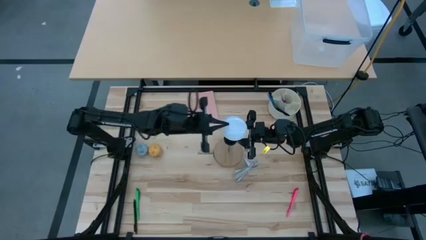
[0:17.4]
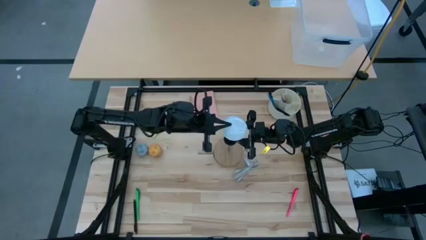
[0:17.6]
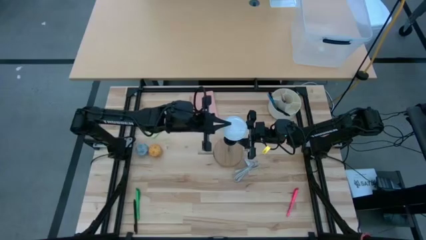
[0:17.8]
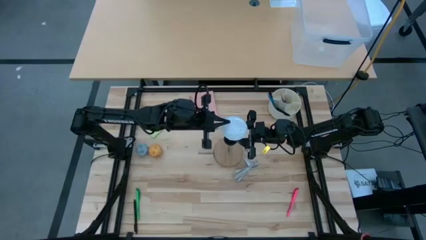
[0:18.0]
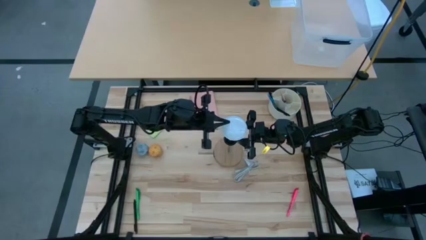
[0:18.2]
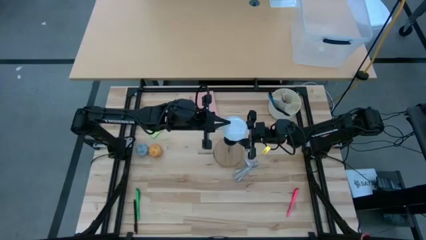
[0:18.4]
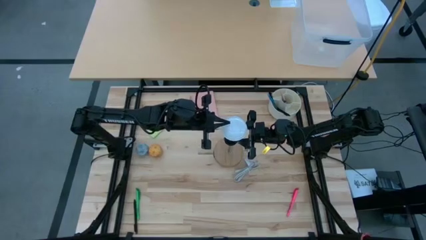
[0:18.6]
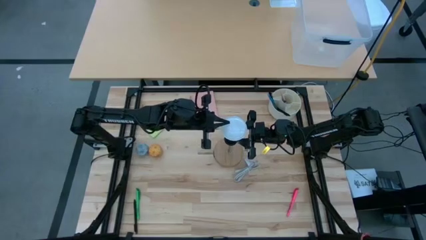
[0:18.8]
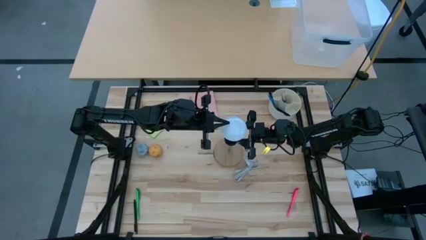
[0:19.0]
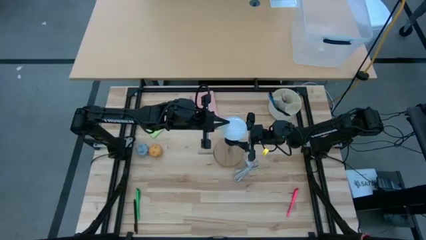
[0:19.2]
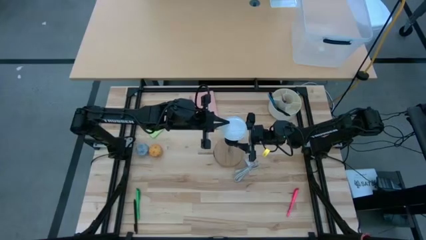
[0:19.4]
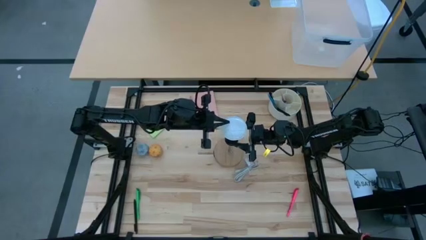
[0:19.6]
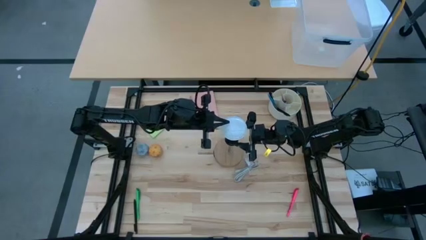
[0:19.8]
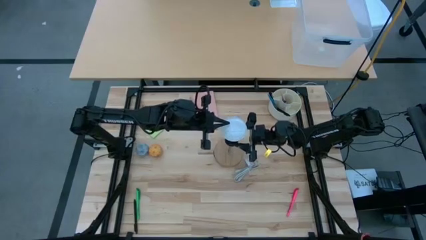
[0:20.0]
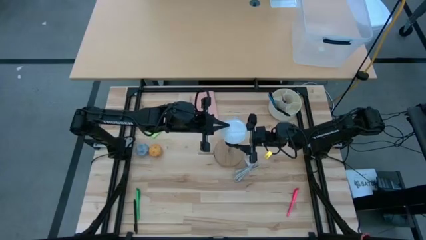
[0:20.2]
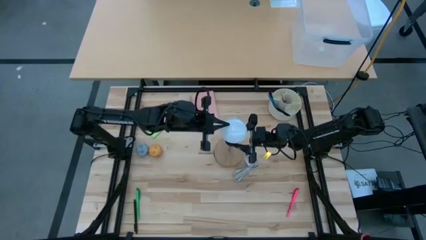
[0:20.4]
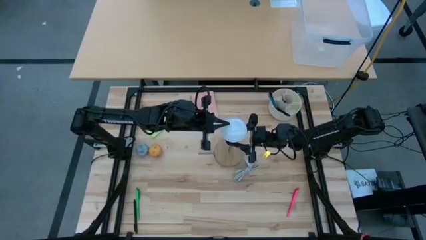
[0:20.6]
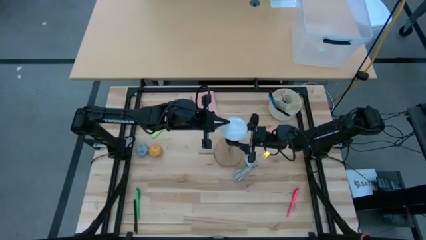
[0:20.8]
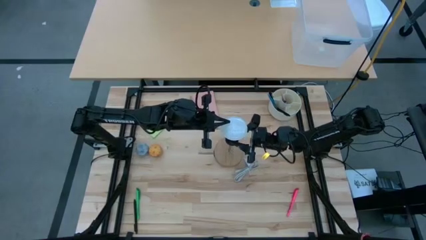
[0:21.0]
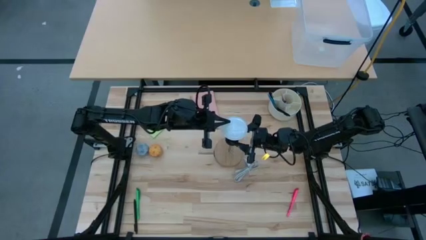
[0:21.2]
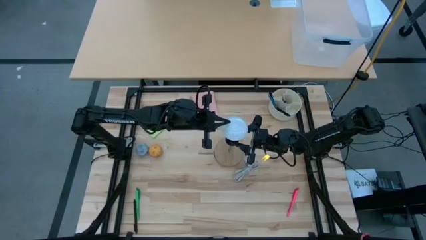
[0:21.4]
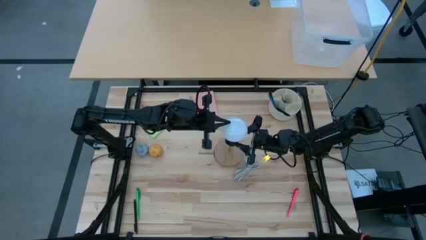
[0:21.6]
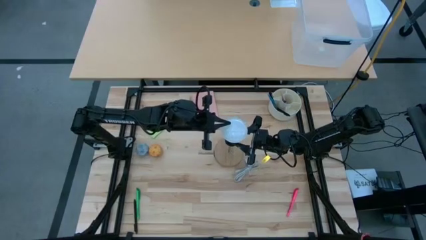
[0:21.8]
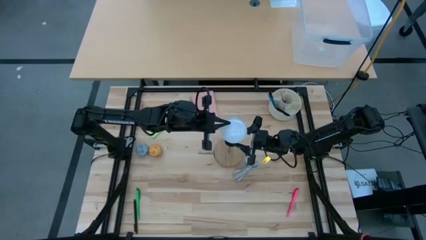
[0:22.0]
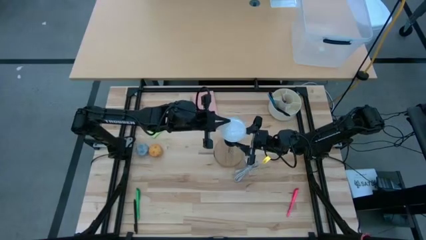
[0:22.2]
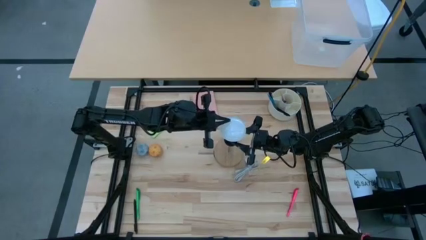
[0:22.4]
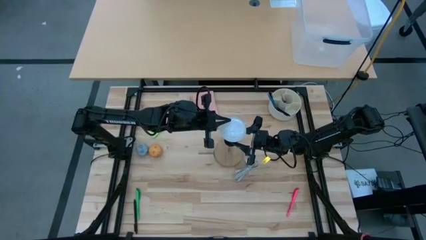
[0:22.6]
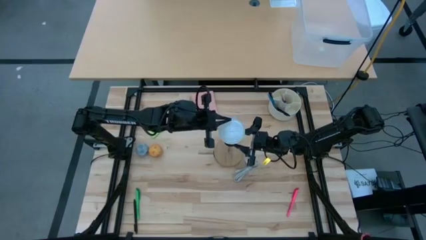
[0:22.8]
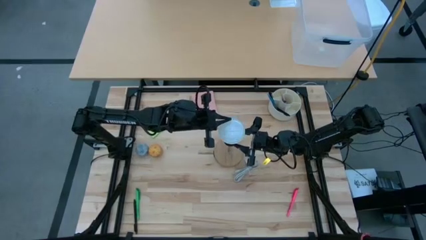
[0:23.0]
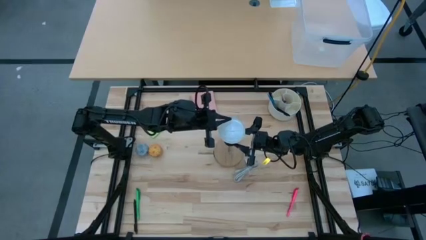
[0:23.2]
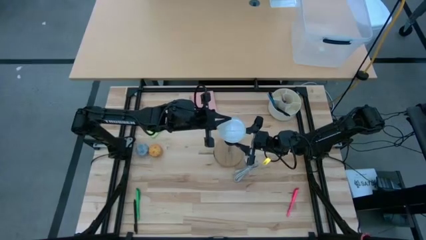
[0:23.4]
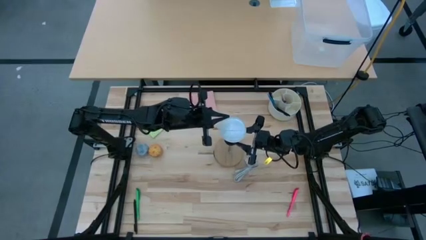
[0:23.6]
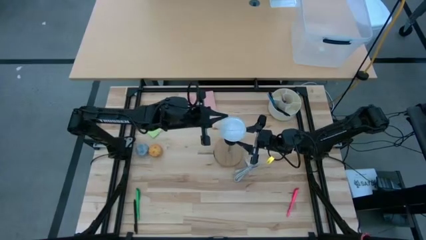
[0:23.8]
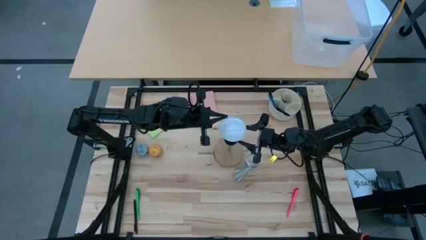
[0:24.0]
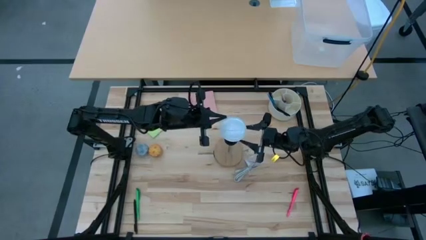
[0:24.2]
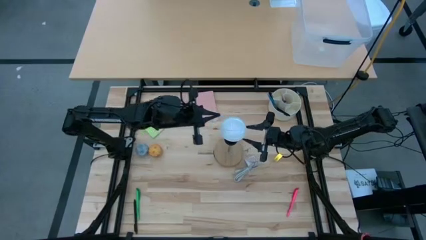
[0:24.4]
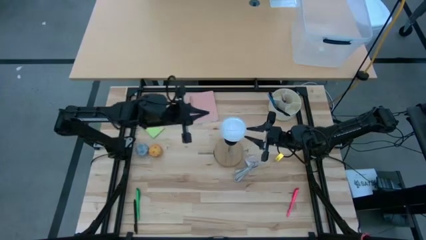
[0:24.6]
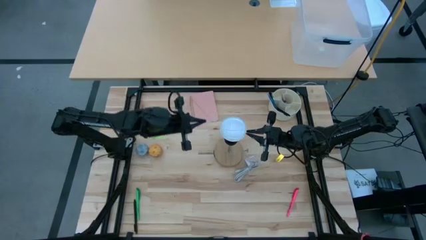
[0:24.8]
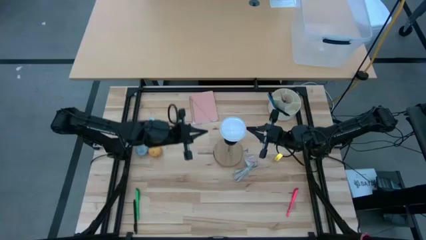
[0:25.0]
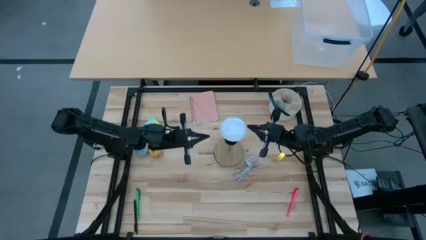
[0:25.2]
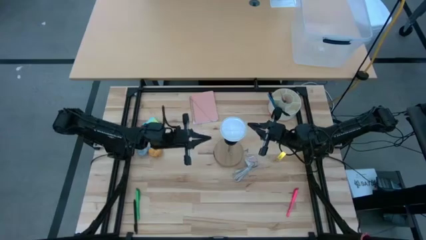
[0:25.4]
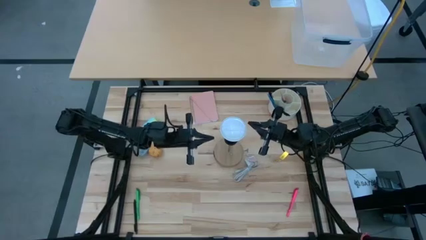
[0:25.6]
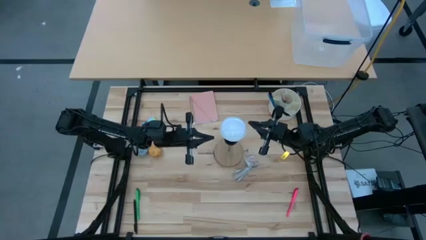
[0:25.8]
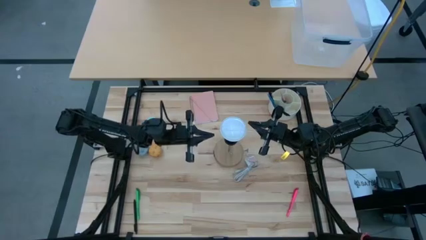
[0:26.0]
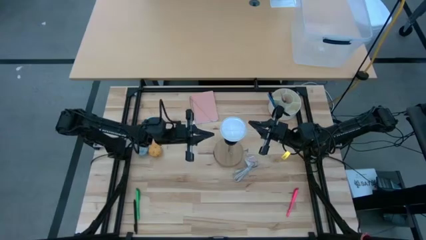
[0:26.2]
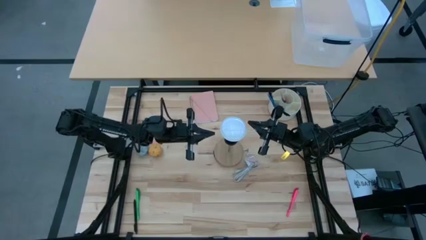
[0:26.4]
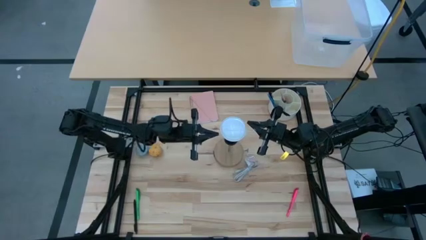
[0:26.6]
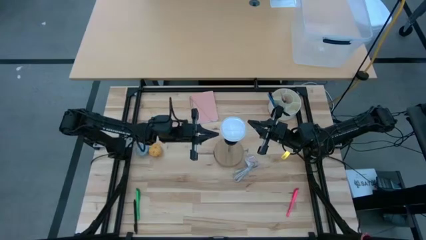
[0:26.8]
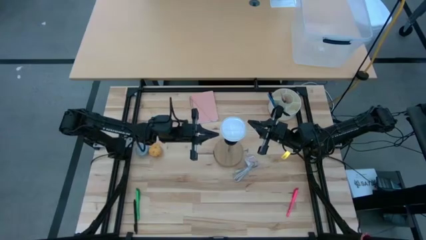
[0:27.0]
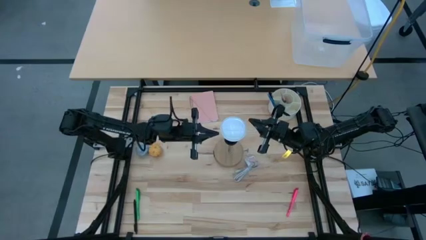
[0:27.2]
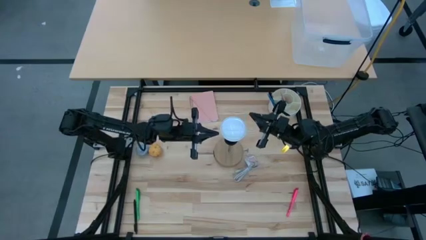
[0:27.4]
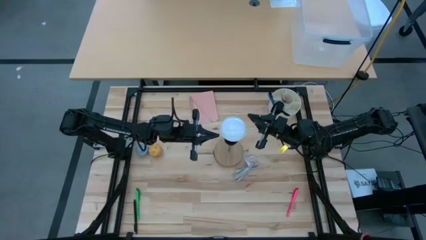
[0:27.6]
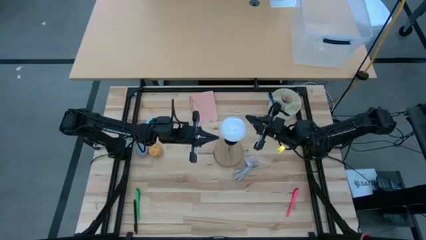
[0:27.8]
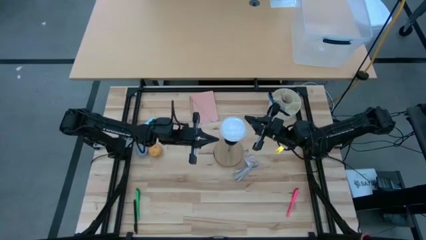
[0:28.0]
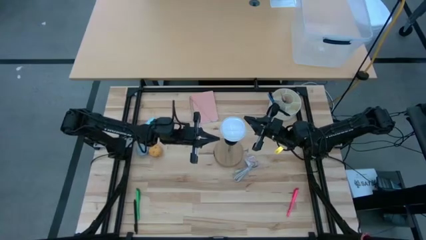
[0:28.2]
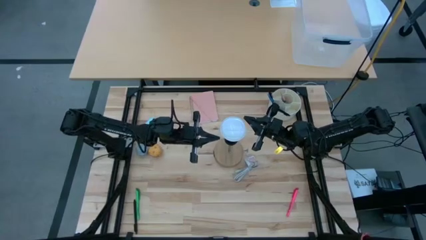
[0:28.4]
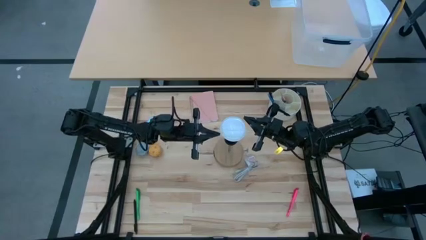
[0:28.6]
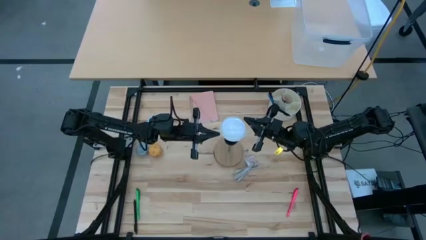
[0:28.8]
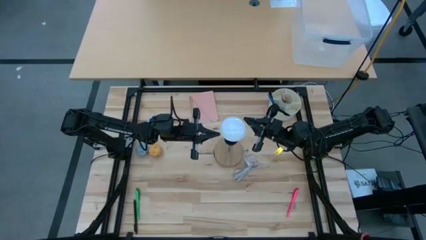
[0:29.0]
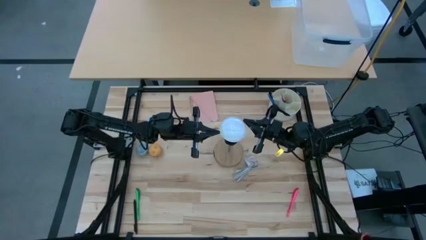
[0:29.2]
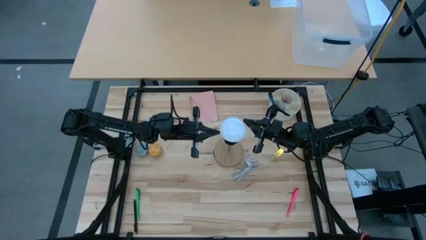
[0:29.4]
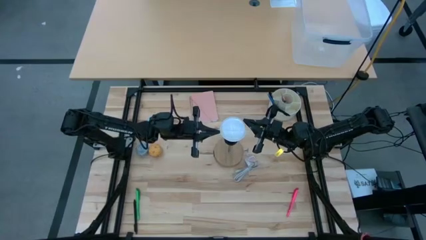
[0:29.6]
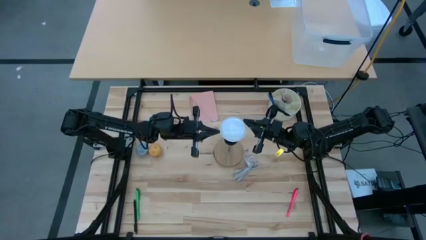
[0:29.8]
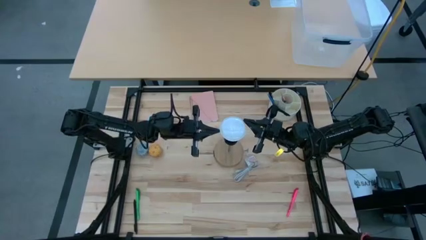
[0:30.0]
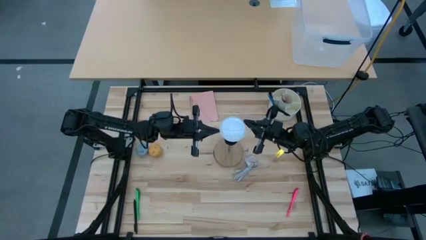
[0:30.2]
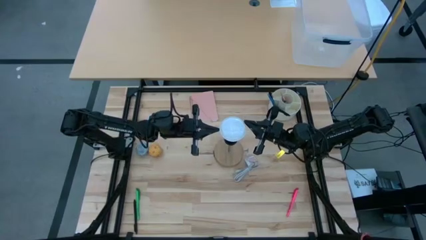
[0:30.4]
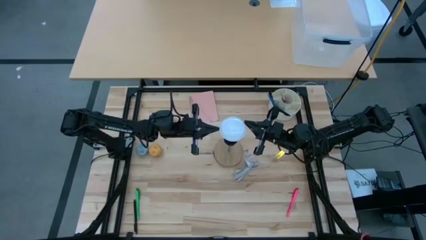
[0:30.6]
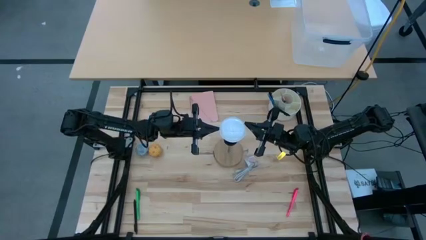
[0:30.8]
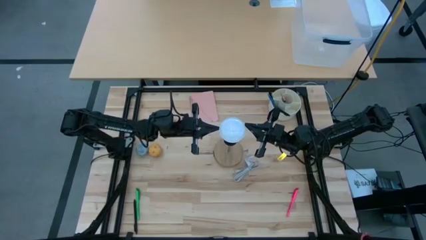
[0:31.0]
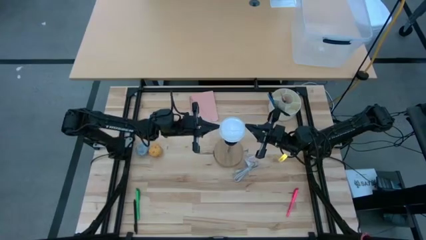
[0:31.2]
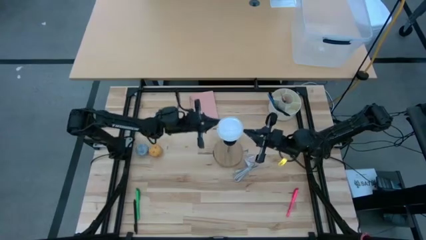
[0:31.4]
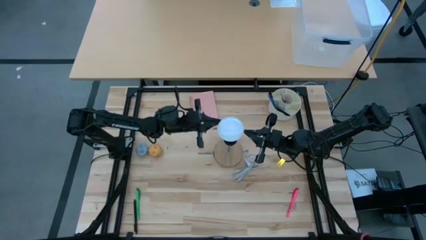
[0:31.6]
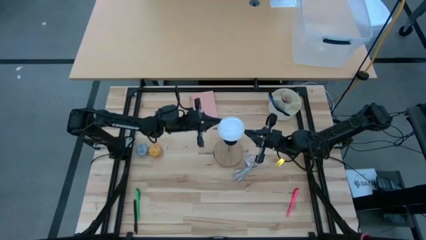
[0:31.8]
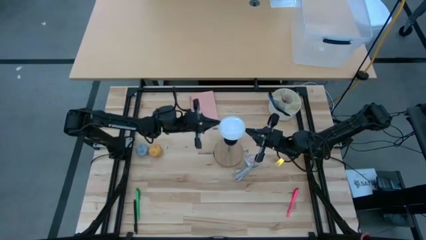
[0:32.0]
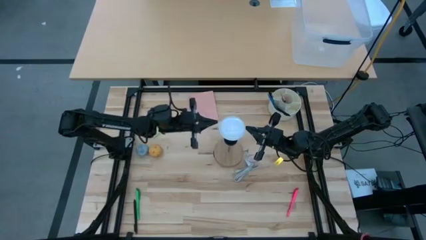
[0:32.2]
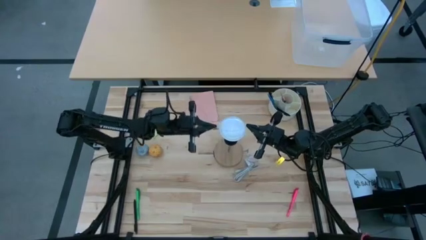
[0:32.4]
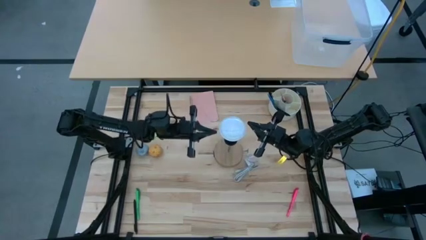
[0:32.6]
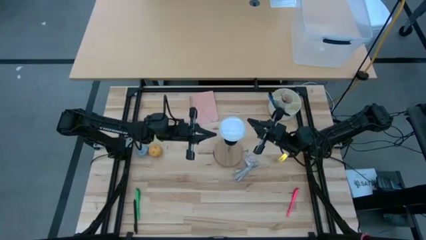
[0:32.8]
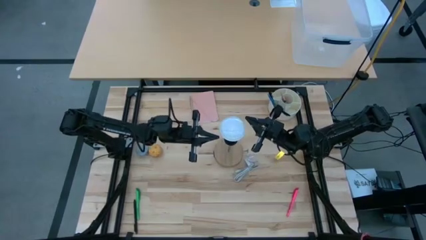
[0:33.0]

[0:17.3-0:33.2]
Task: Screw lightbulb
Insert the lightbulb into the lamp
